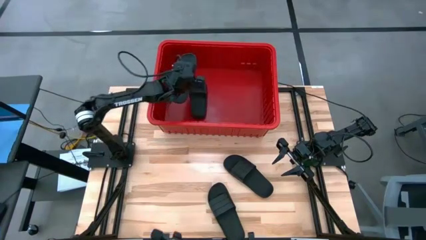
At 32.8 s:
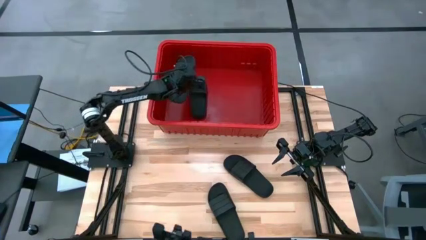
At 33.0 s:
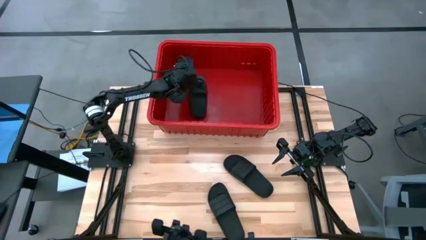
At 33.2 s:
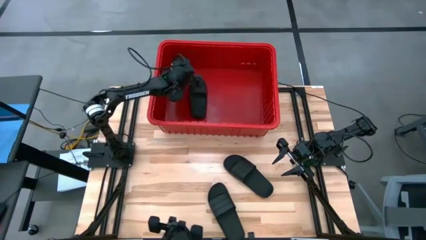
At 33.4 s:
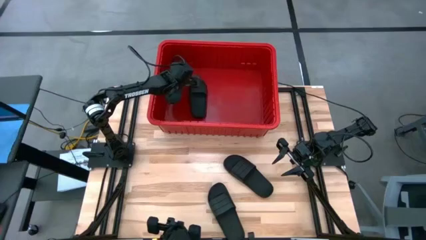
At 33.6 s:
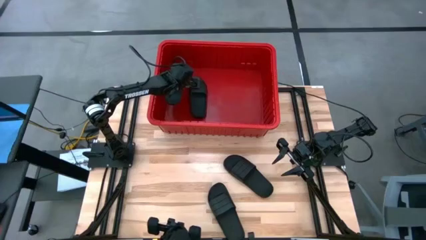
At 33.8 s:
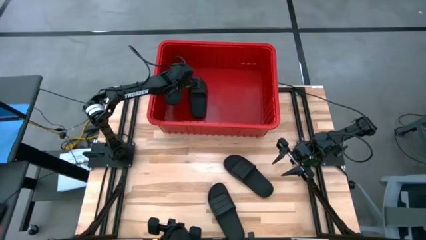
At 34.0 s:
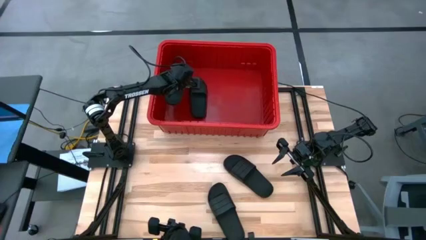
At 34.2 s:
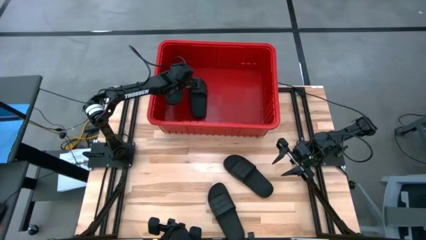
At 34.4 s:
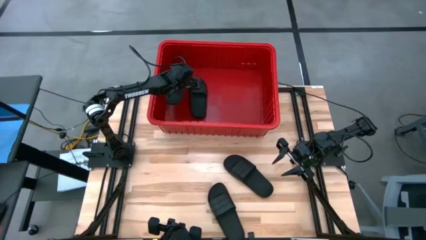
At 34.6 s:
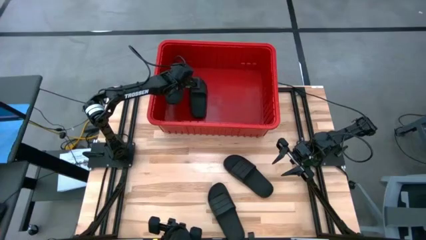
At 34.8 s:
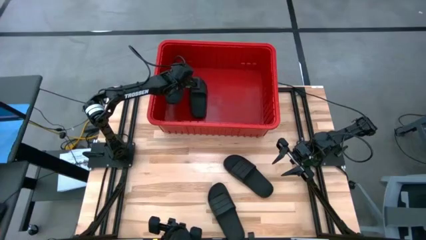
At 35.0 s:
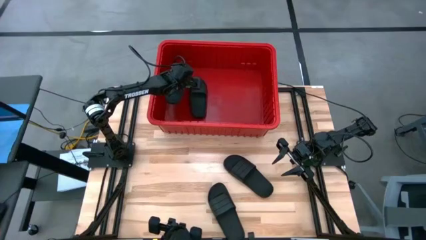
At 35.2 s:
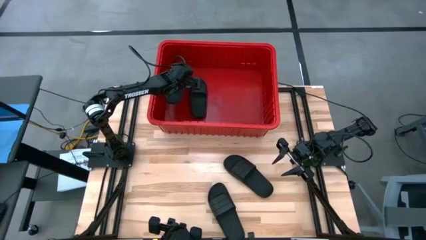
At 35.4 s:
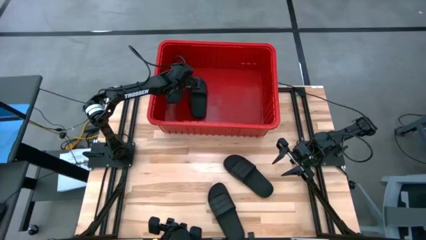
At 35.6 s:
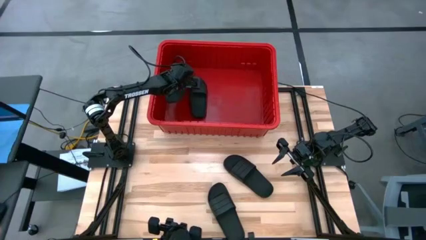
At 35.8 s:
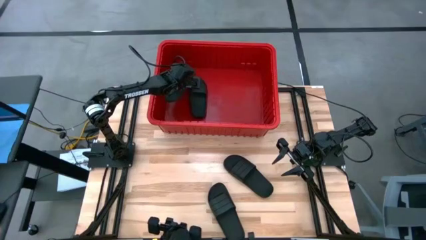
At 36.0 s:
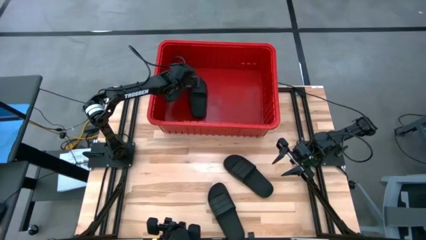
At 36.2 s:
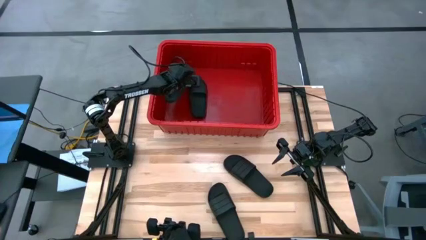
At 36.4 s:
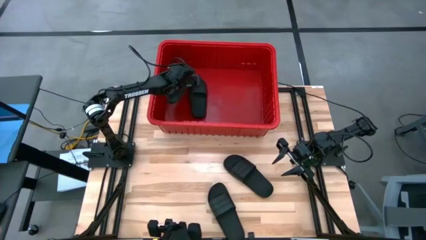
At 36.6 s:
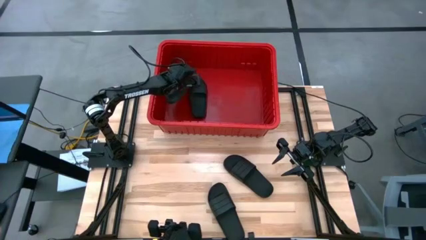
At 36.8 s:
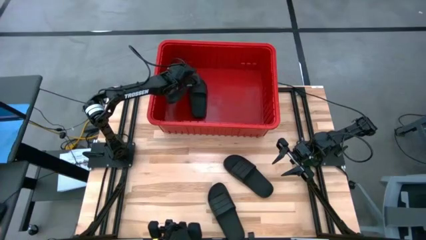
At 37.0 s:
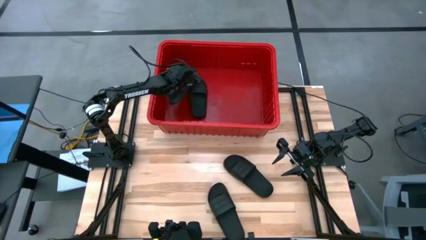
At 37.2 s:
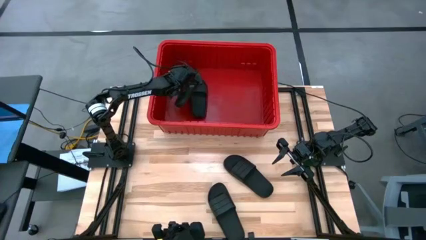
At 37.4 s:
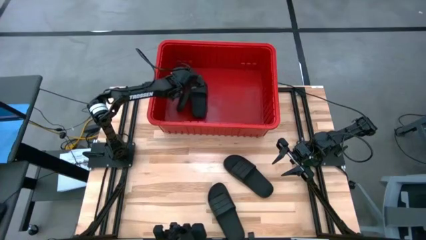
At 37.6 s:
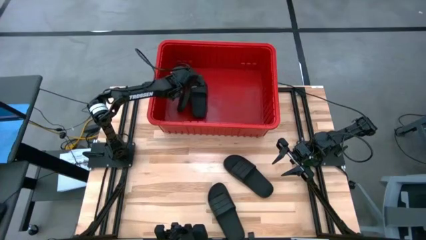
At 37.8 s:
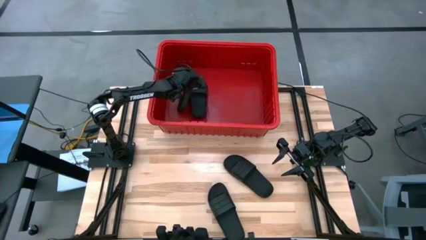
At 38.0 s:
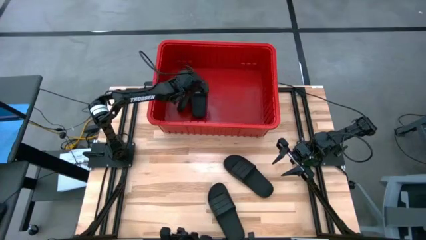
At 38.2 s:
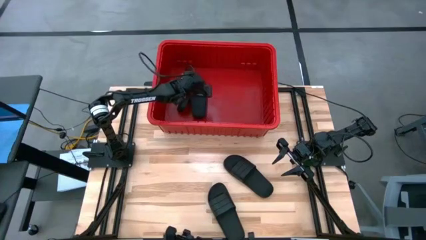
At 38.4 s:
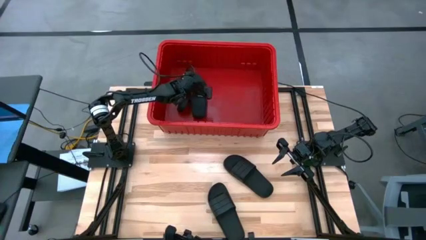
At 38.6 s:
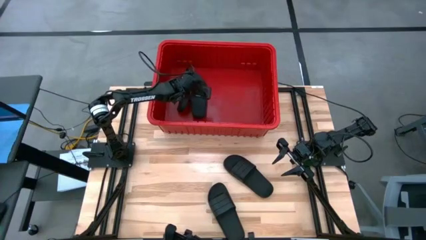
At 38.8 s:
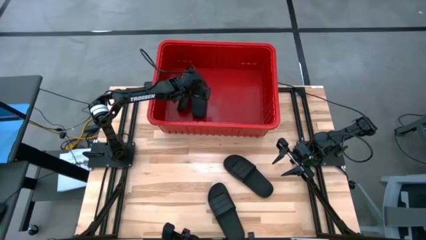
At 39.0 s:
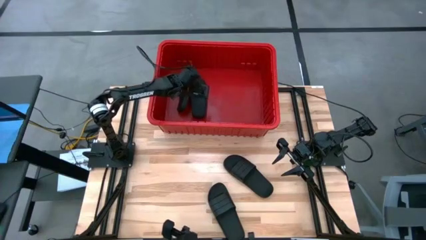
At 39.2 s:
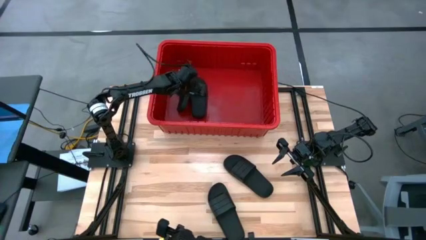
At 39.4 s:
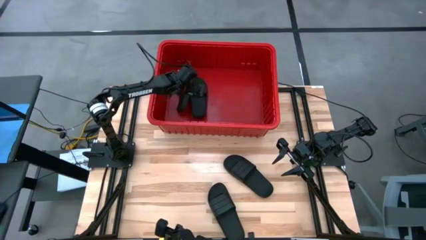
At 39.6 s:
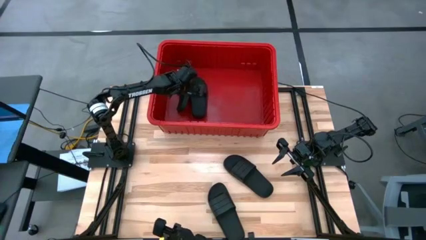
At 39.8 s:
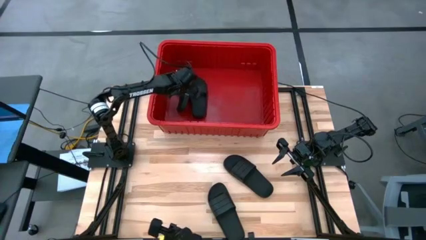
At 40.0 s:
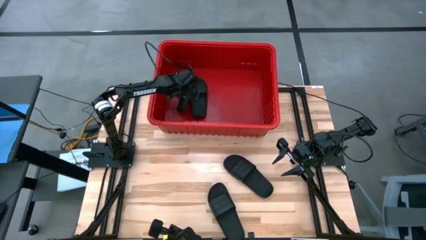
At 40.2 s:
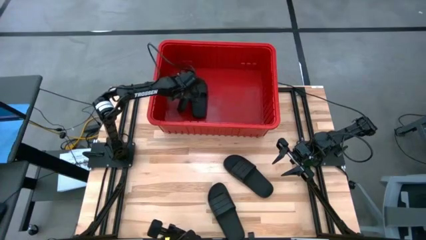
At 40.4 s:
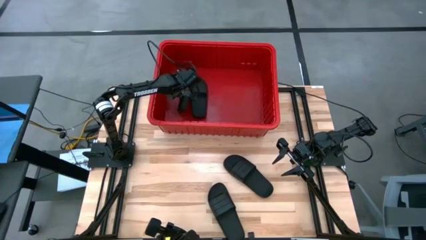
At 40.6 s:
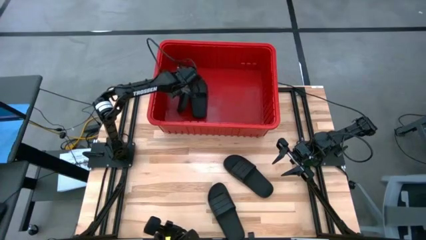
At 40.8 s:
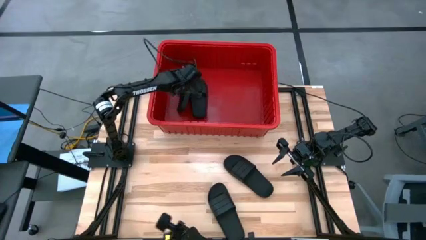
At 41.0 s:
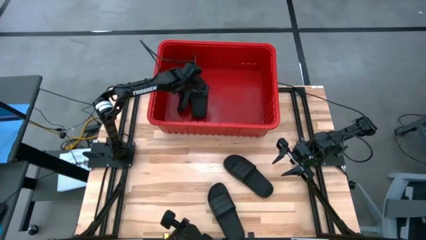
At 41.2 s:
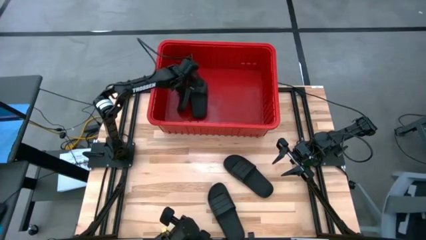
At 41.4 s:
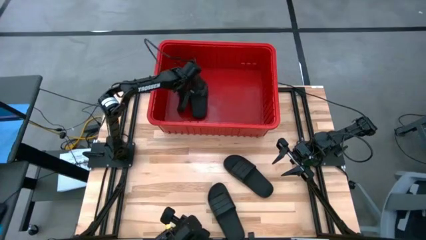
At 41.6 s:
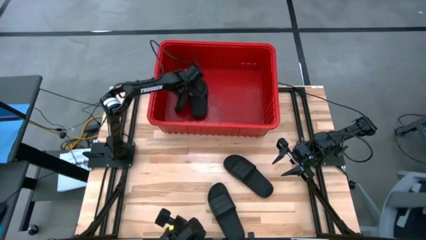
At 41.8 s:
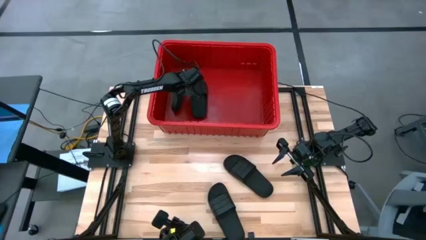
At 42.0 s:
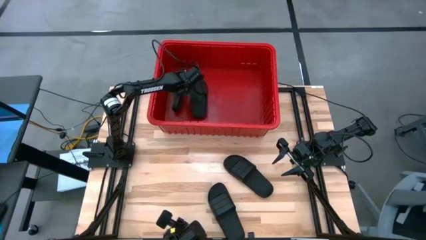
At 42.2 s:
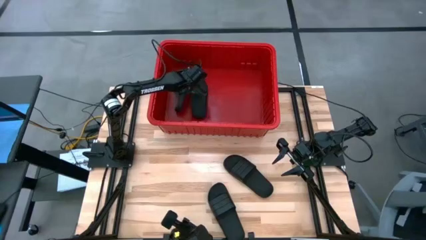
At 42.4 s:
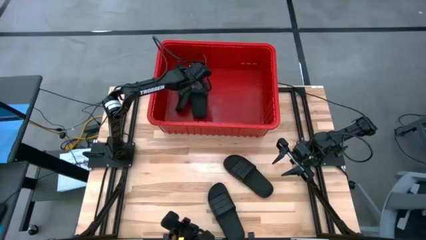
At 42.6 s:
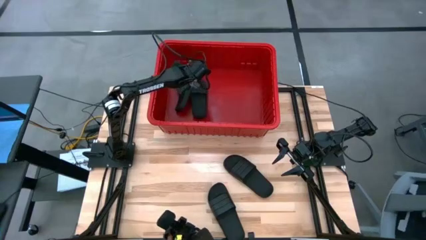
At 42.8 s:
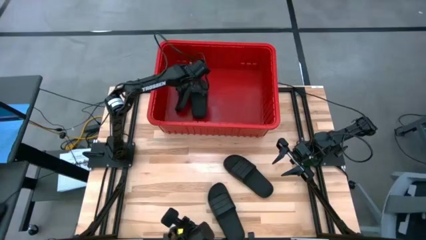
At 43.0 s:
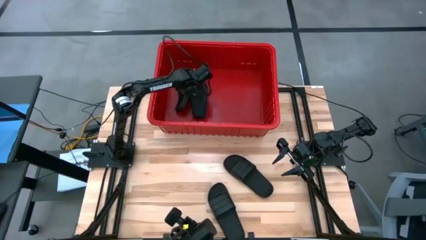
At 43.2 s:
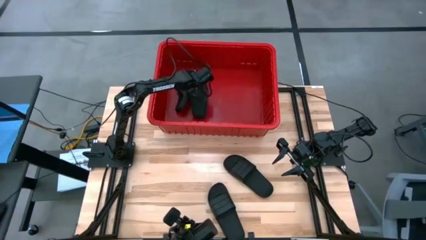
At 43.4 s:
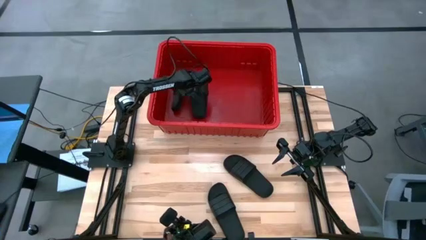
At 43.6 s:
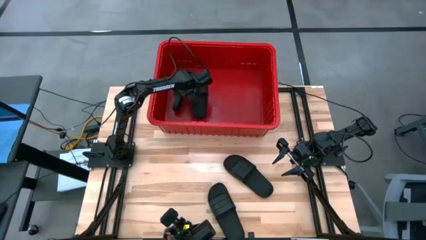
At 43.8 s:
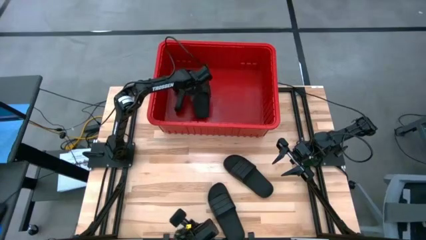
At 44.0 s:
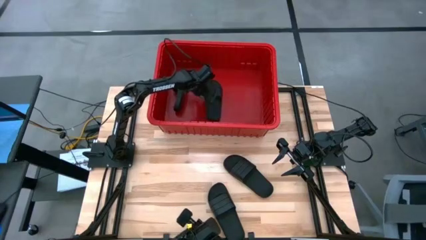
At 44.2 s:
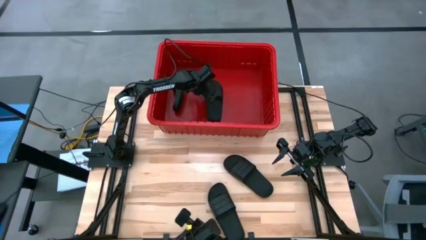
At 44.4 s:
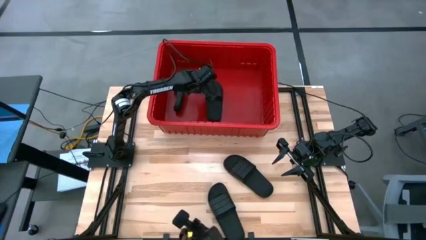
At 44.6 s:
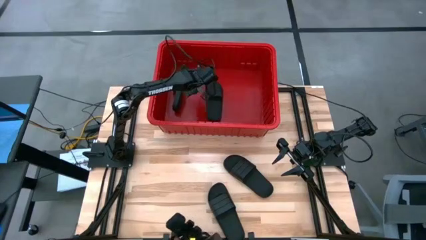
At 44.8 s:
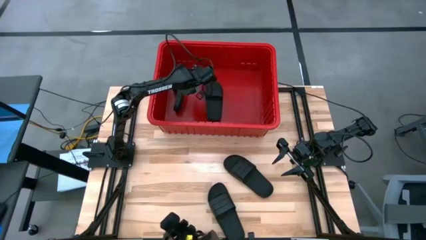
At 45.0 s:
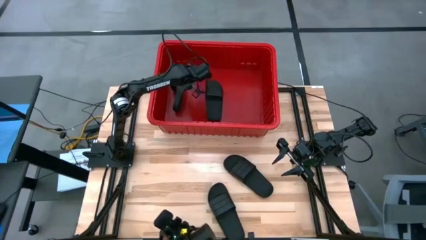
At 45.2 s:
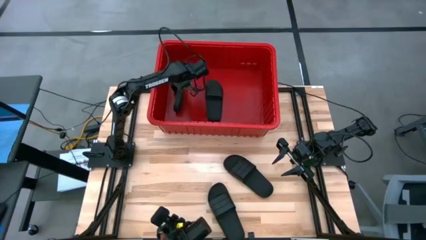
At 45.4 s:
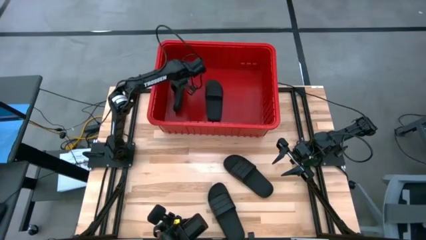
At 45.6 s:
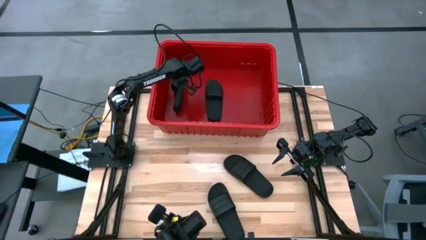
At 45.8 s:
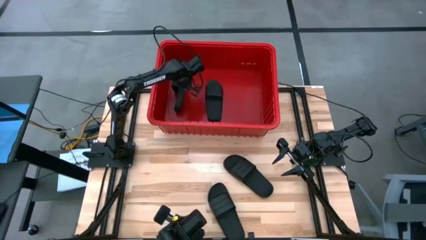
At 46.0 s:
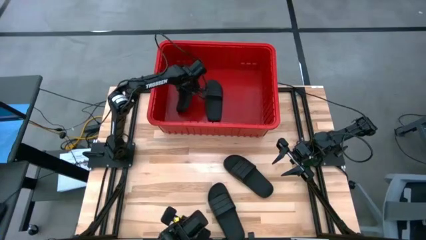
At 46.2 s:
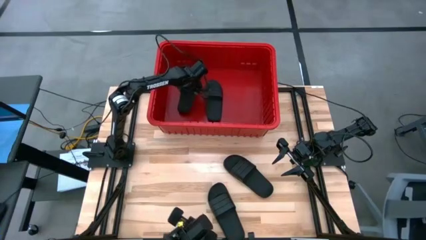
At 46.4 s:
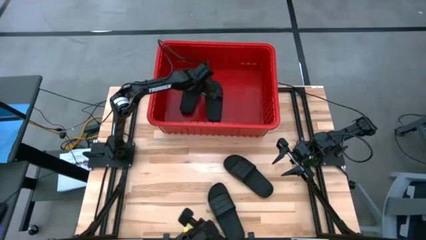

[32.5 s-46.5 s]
Task: Pick and place slides into bin
Put the top slipper into the organizer bin
